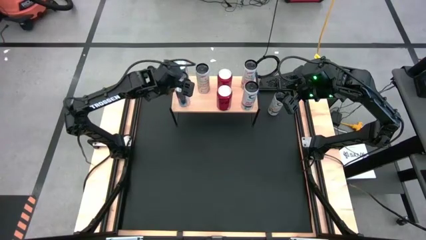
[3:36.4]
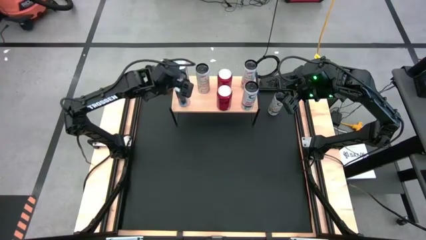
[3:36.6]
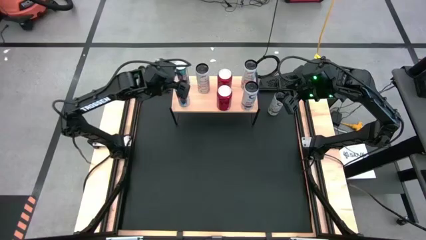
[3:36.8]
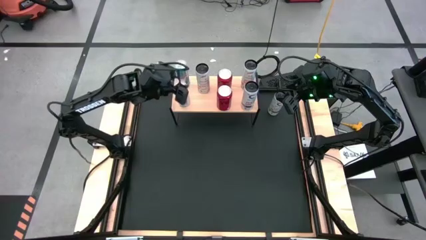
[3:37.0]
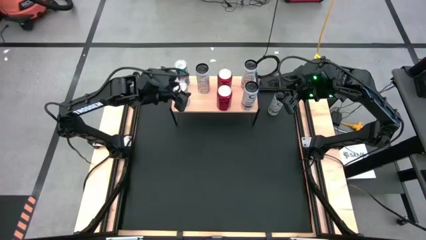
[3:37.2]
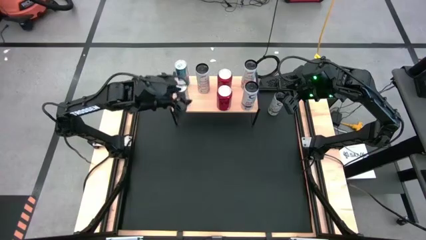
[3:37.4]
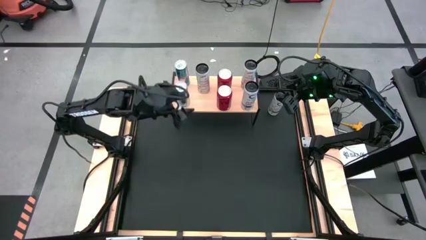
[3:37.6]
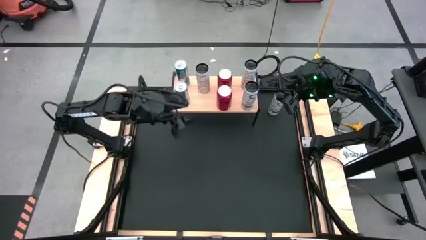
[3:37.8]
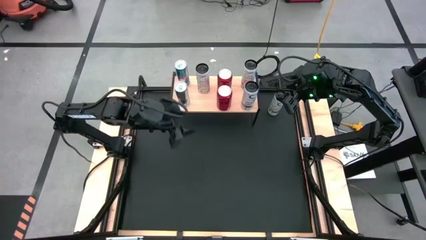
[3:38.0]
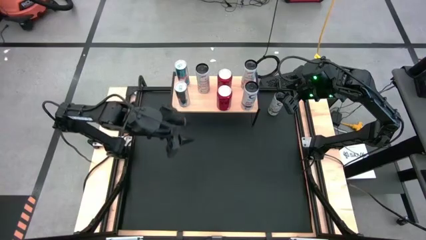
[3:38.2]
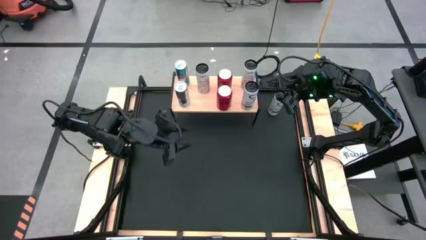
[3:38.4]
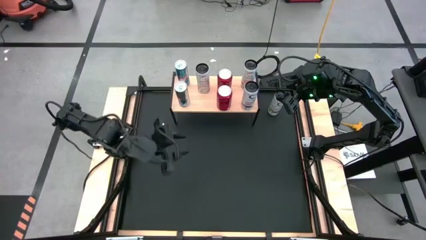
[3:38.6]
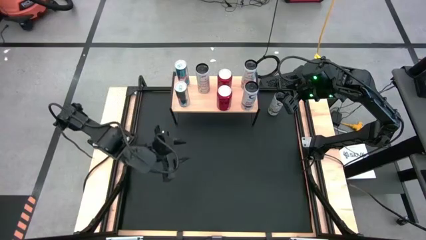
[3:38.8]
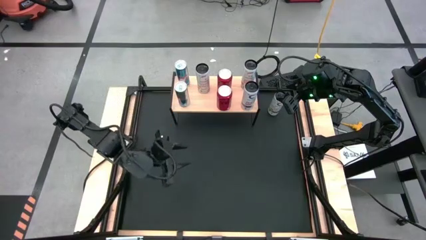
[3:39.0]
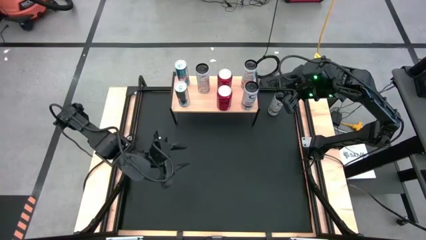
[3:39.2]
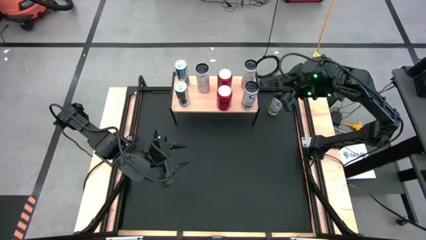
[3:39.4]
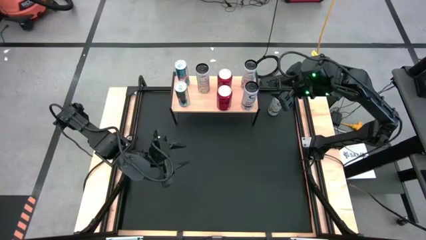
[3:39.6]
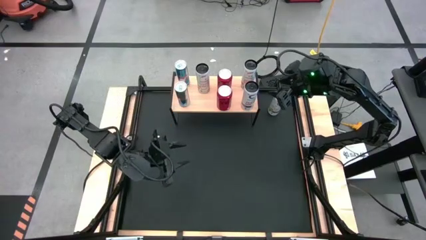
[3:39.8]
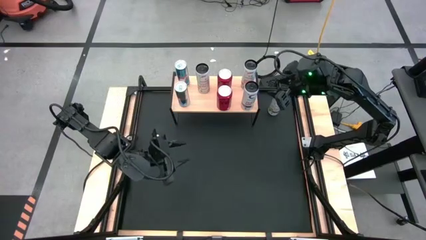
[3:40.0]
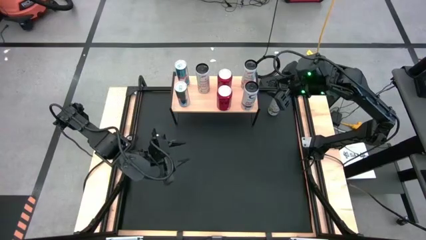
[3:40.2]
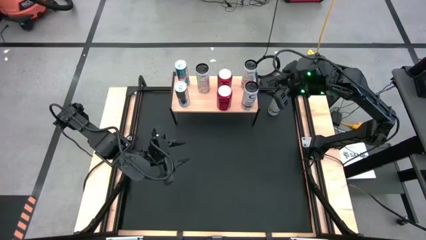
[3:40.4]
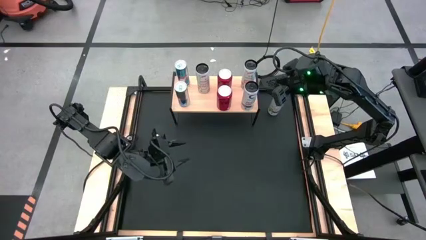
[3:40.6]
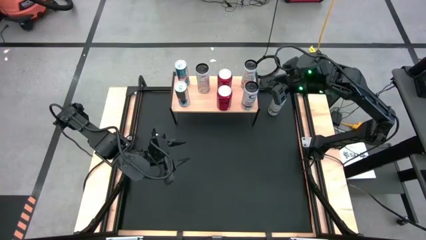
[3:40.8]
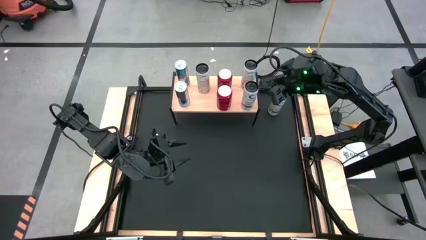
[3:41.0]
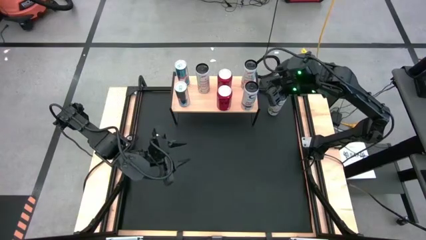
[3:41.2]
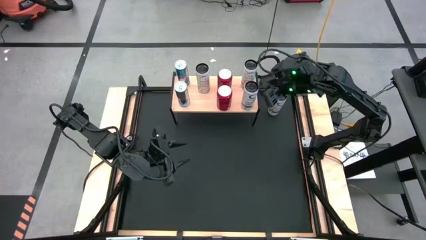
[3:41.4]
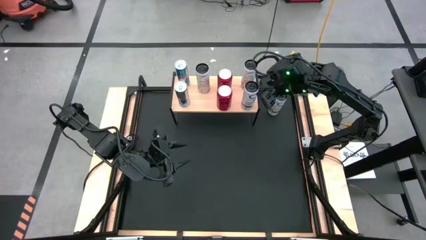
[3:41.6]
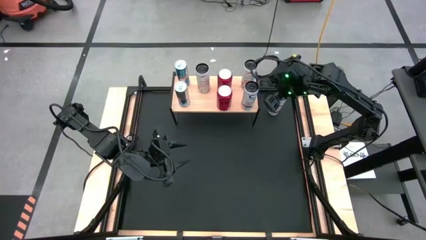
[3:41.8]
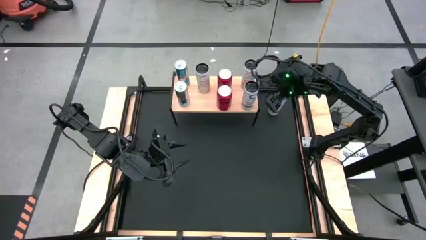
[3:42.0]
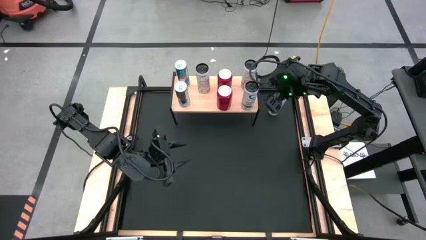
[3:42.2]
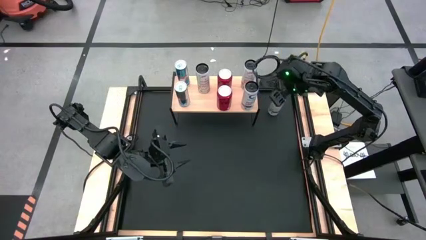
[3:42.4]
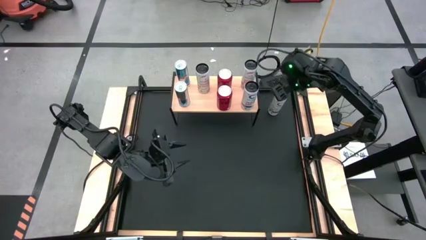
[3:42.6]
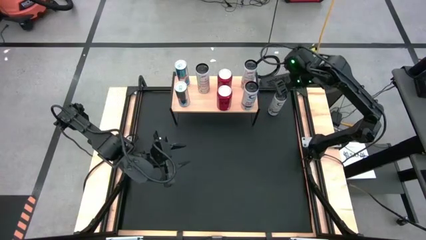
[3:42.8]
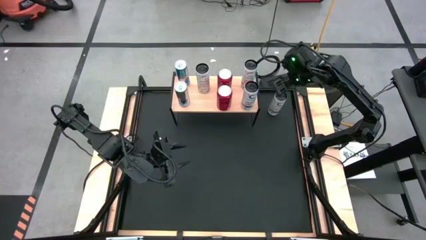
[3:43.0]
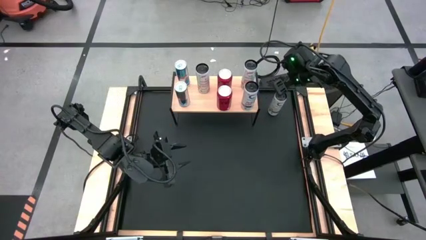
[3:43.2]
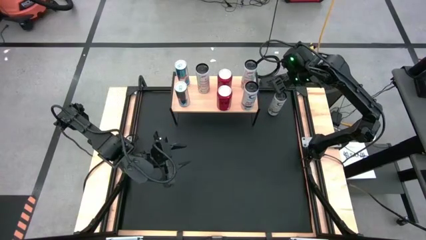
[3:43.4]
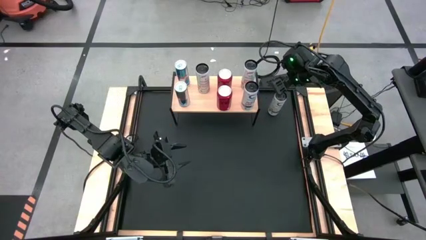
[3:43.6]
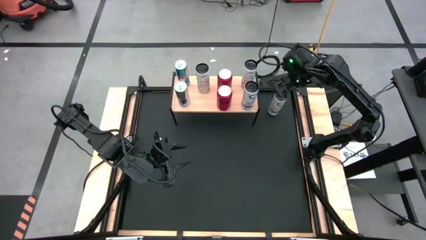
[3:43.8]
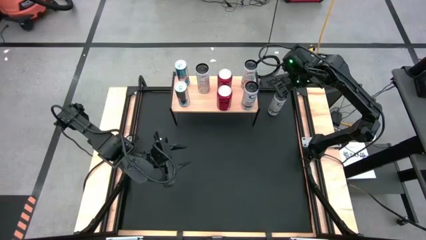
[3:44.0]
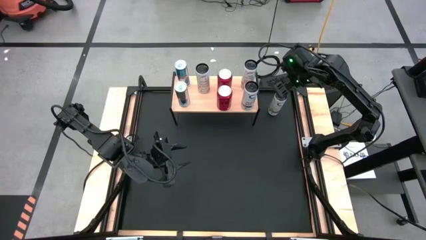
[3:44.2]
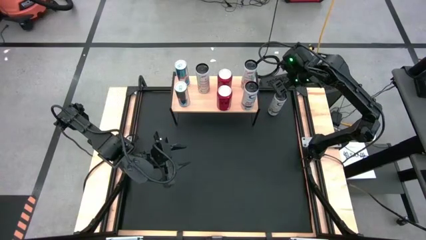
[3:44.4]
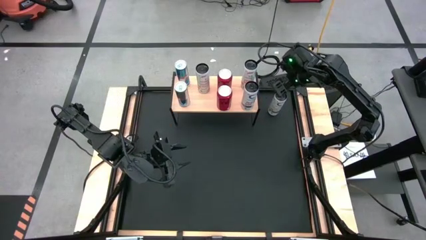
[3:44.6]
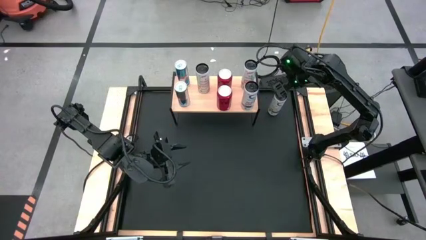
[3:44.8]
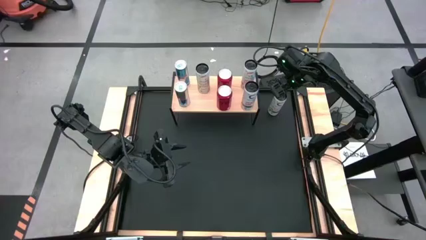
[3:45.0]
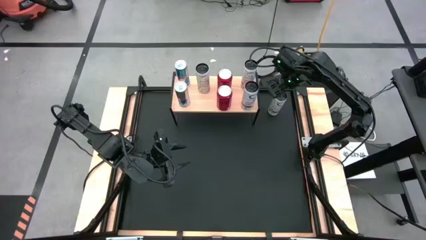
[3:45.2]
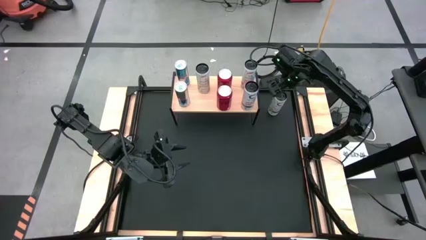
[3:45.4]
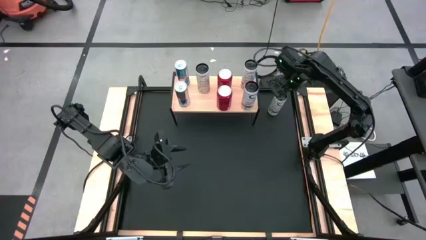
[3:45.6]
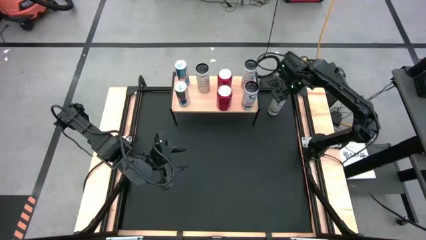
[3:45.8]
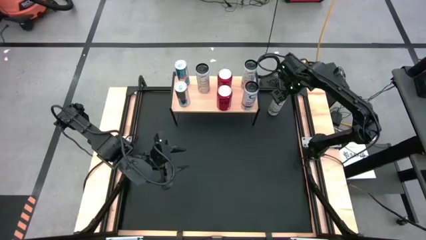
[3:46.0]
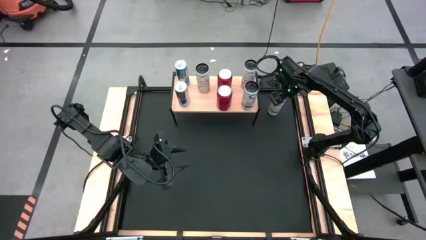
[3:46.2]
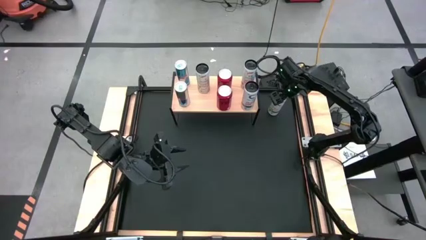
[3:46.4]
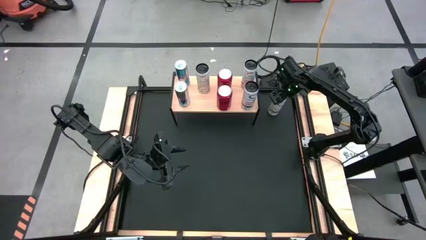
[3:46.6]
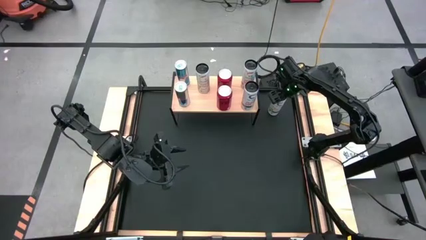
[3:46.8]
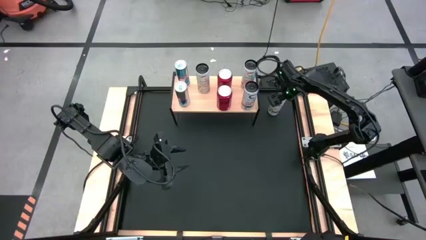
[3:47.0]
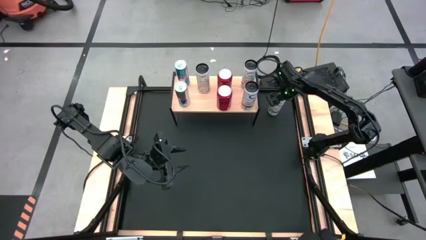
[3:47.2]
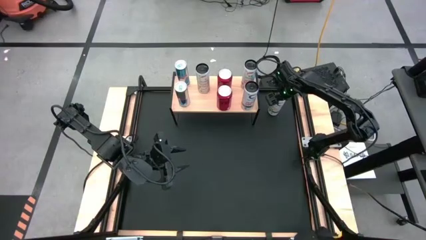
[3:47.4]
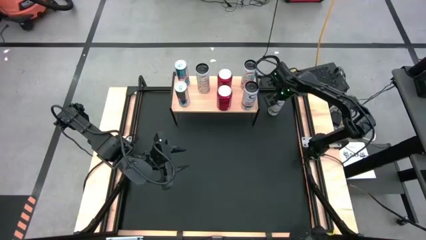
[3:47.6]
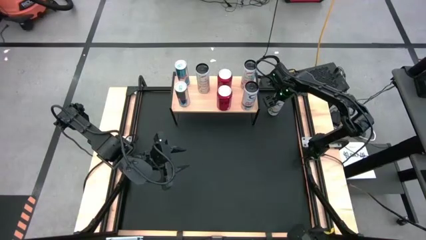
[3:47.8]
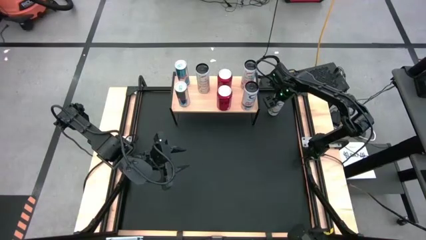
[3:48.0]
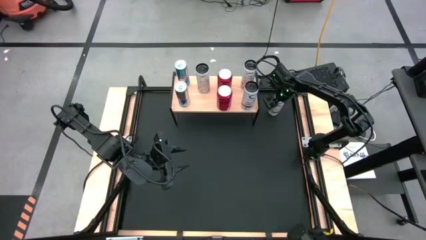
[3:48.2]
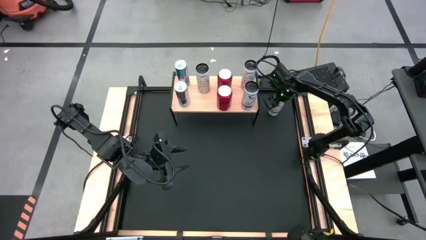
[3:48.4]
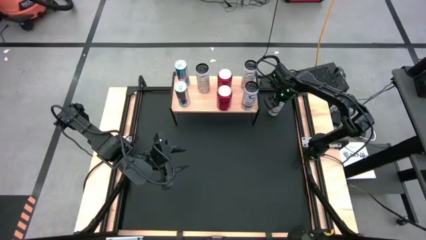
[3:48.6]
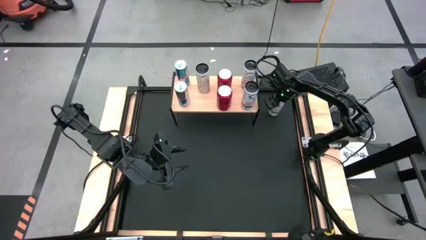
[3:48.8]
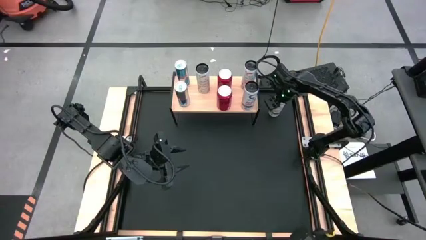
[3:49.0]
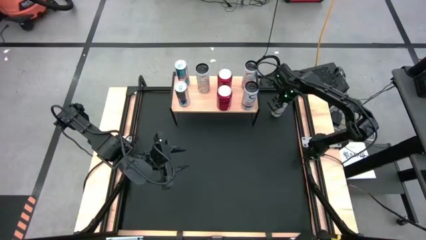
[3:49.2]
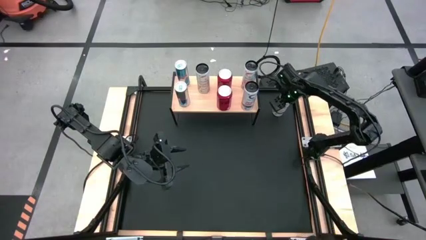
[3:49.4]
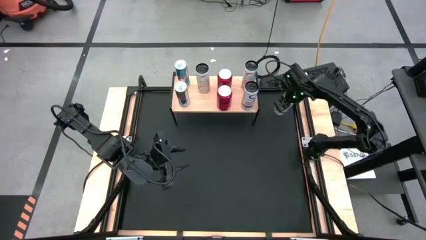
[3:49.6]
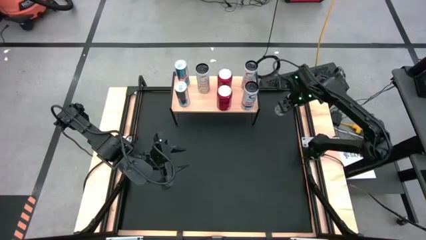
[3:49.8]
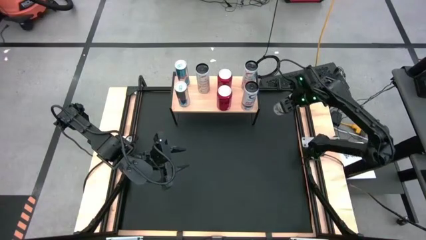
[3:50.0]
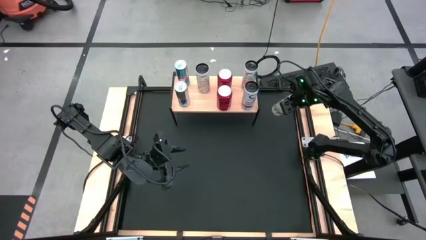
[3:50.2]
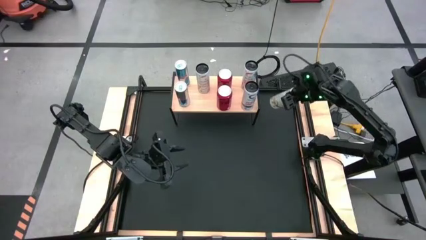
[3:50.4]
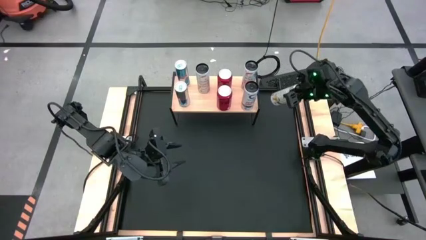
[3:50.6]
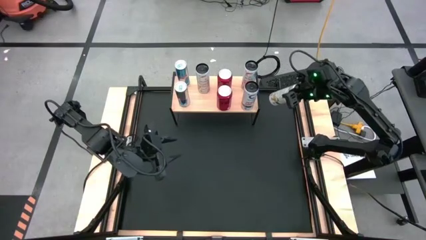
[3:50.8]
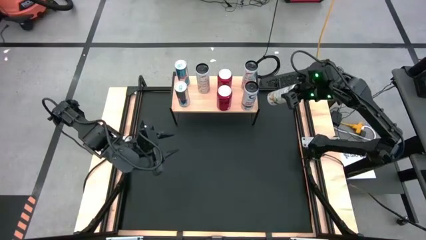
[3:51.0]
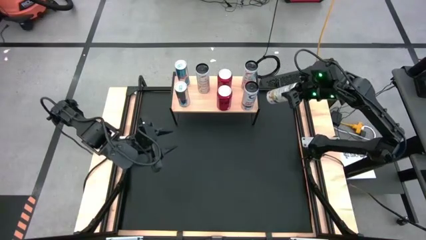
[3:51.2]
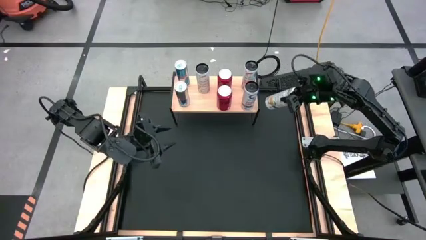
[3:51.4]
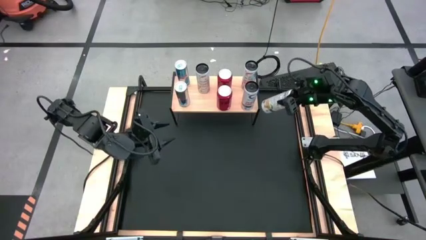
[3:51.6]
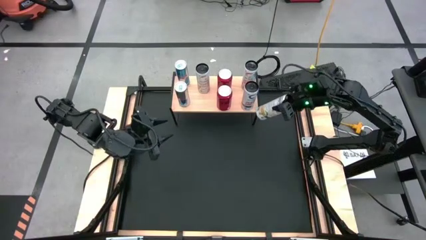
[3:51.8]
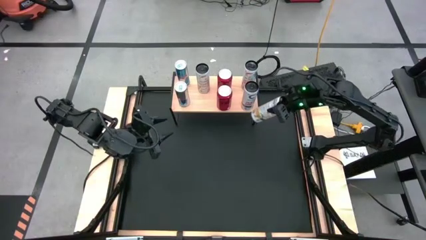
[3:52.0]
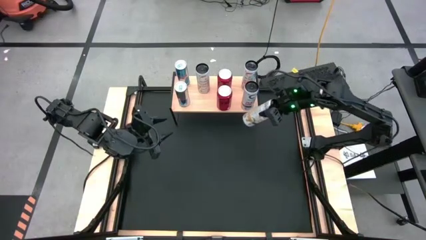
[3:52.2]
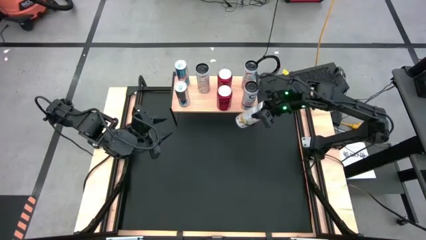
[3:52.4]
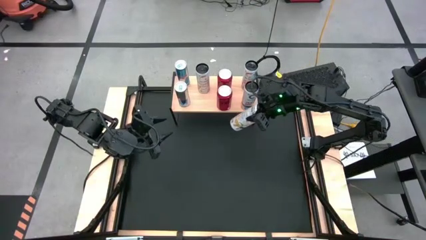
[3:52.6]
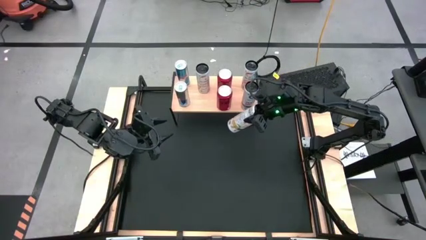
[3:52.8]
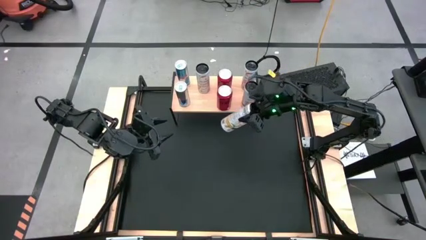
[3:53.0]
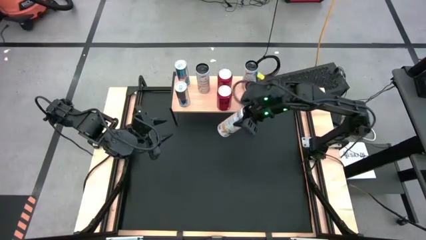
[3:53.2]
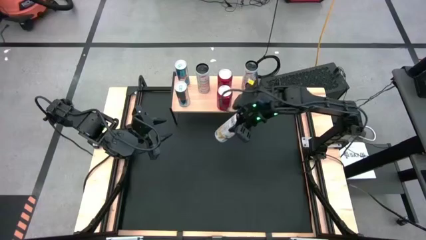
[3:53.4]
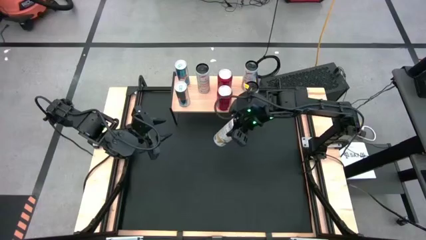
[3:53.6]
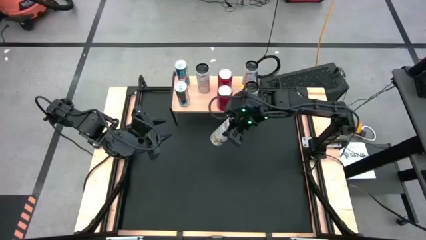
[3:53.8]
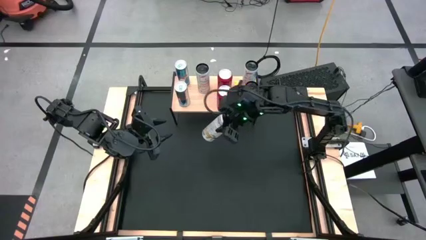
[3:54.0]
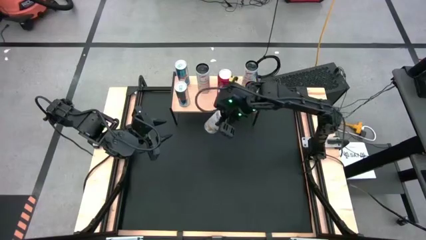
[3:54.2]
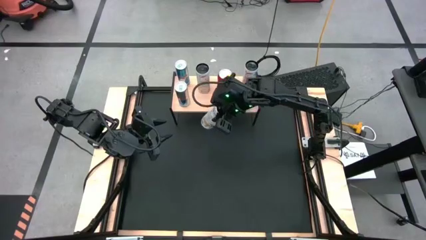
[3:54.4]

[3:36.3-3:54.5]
Task: Place canned beverage on shelf
Put the white orange soda can on the shelf aligned with the other white orange soda can
